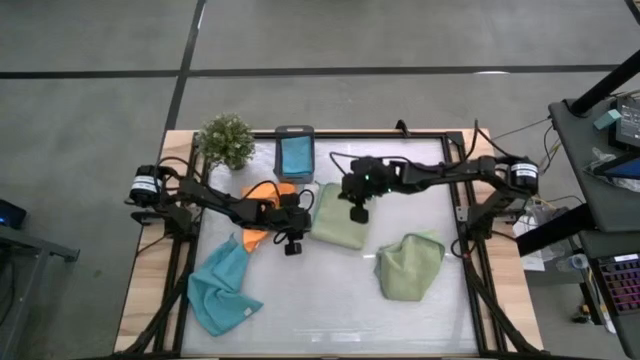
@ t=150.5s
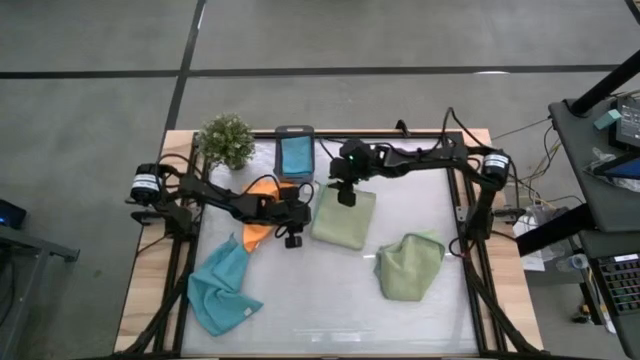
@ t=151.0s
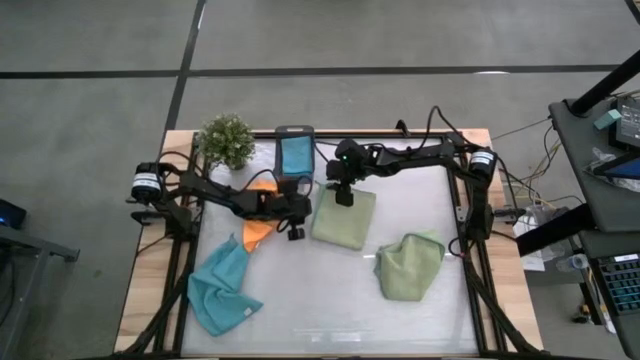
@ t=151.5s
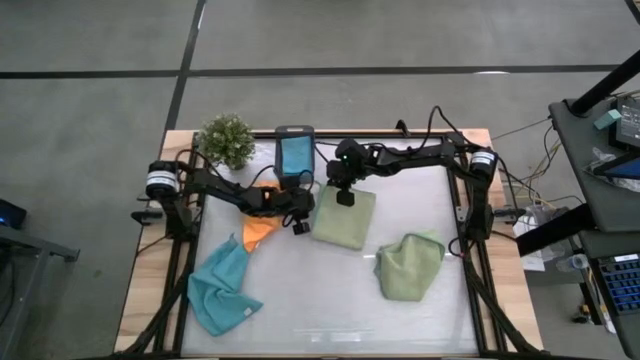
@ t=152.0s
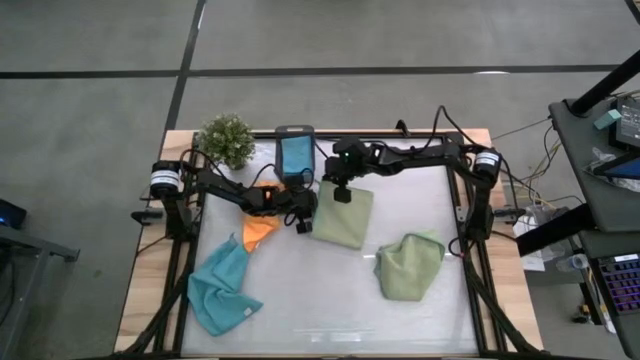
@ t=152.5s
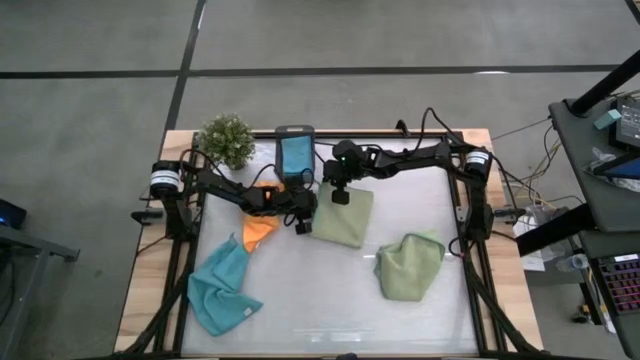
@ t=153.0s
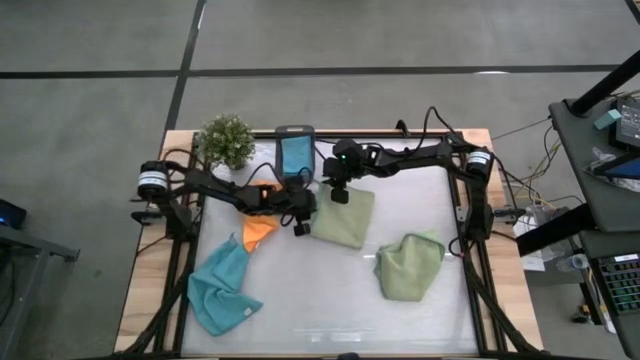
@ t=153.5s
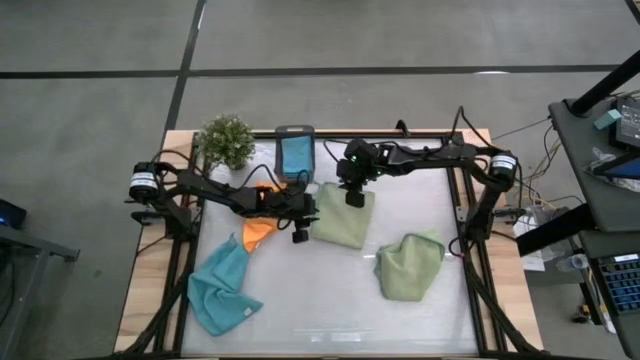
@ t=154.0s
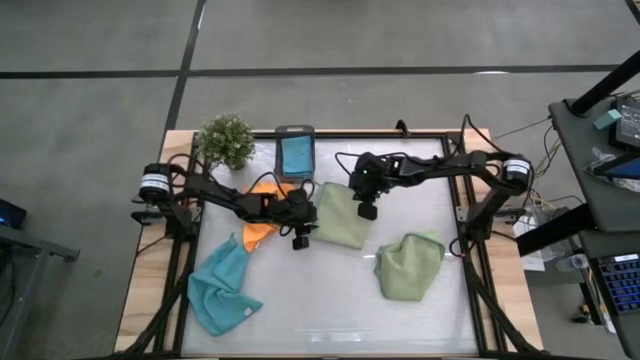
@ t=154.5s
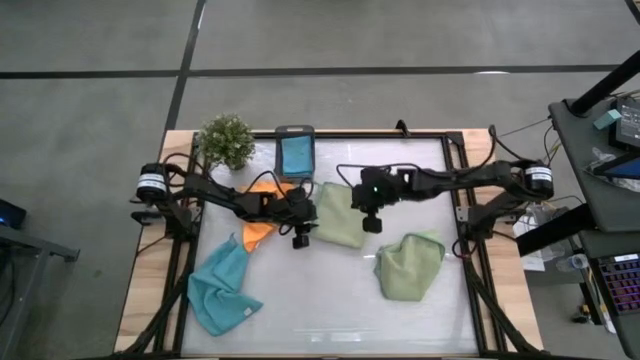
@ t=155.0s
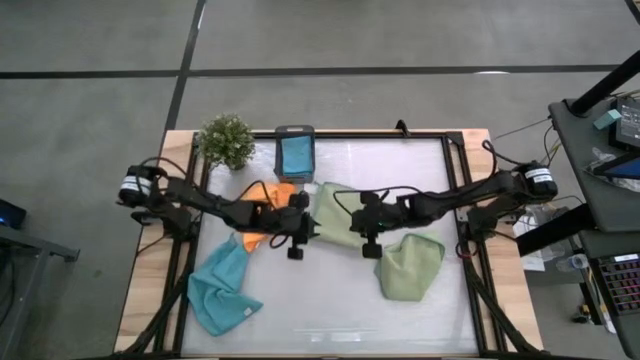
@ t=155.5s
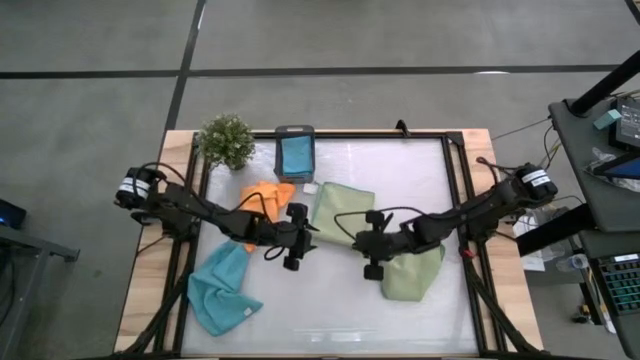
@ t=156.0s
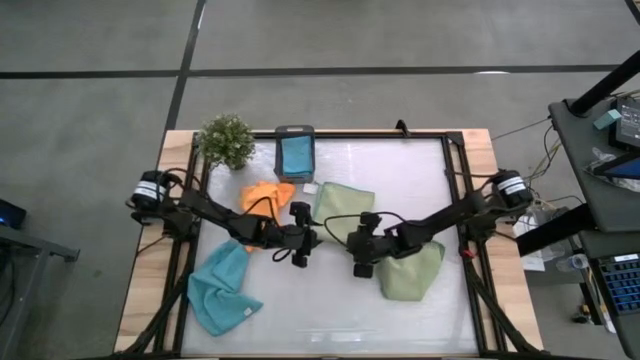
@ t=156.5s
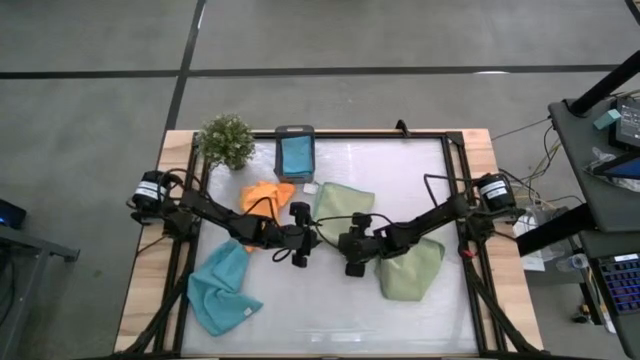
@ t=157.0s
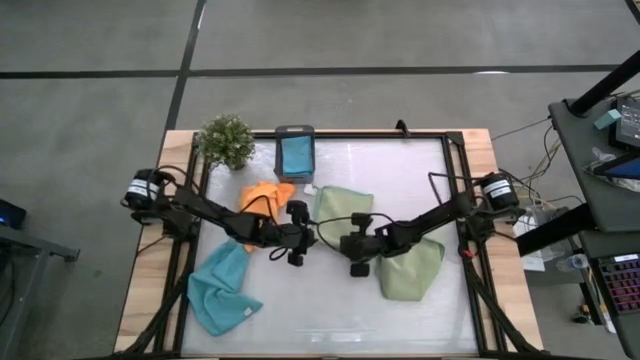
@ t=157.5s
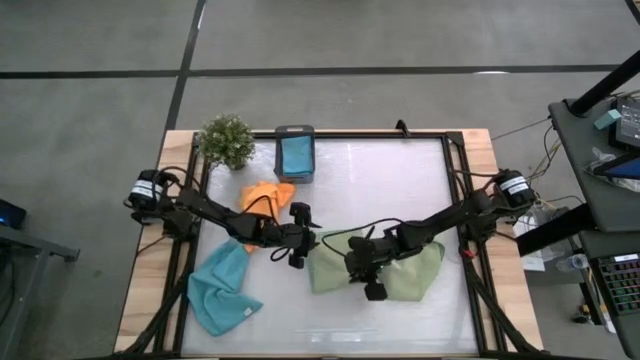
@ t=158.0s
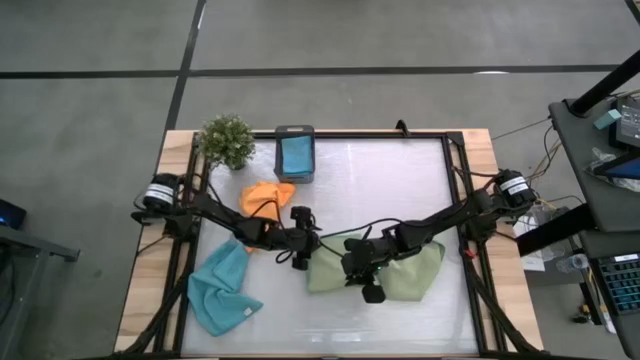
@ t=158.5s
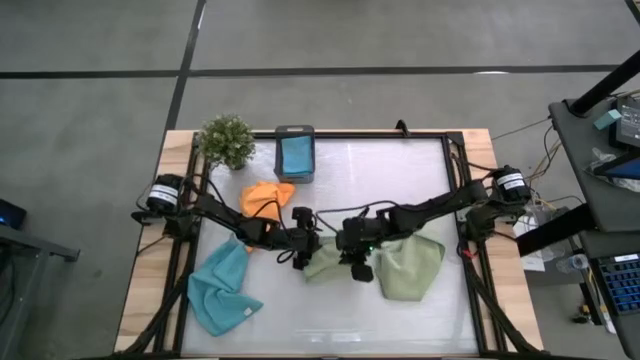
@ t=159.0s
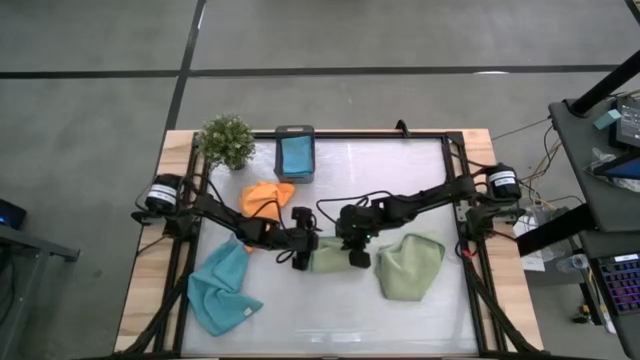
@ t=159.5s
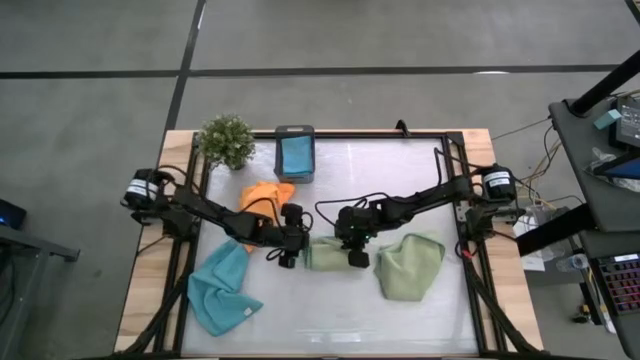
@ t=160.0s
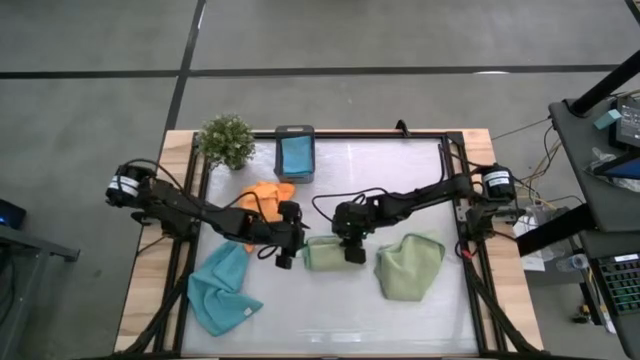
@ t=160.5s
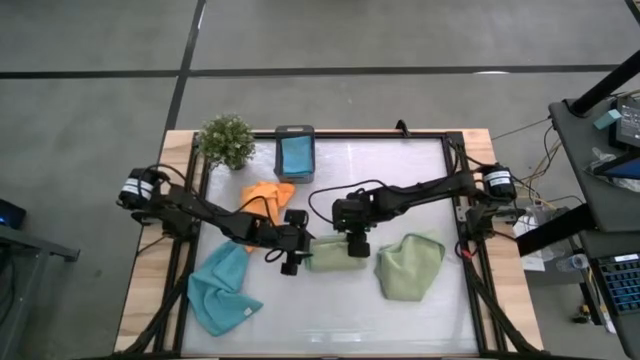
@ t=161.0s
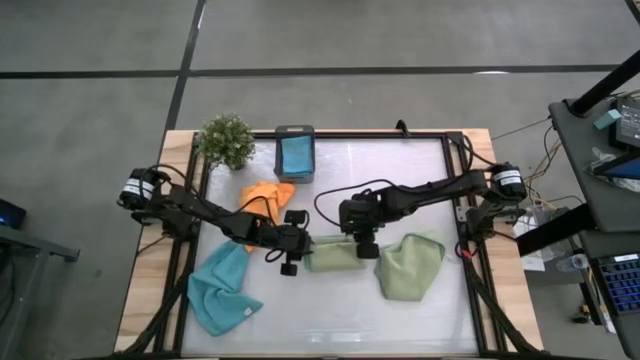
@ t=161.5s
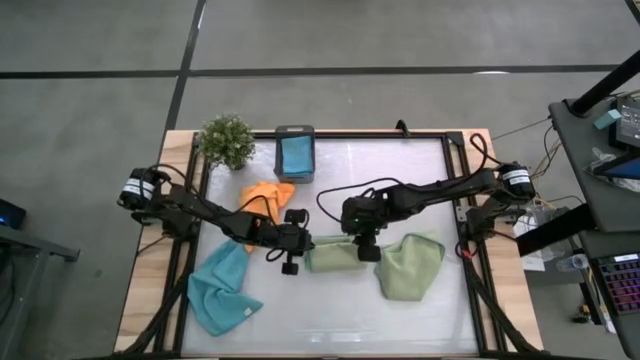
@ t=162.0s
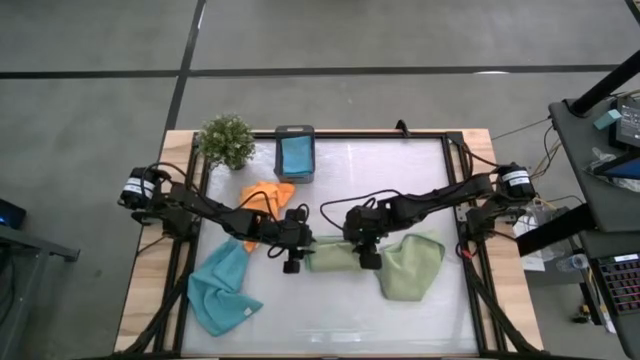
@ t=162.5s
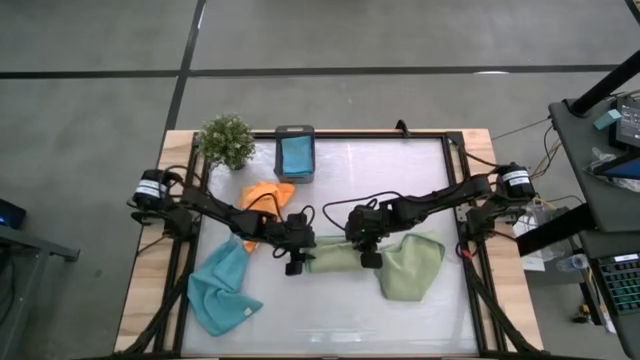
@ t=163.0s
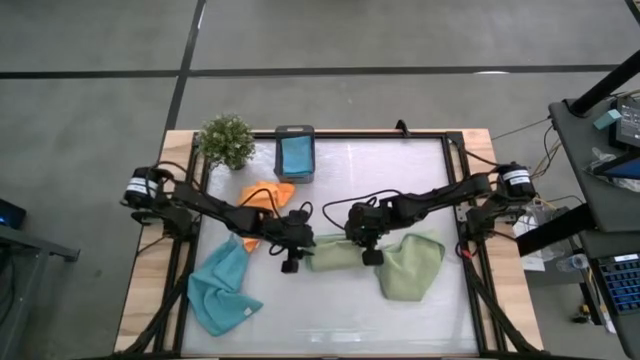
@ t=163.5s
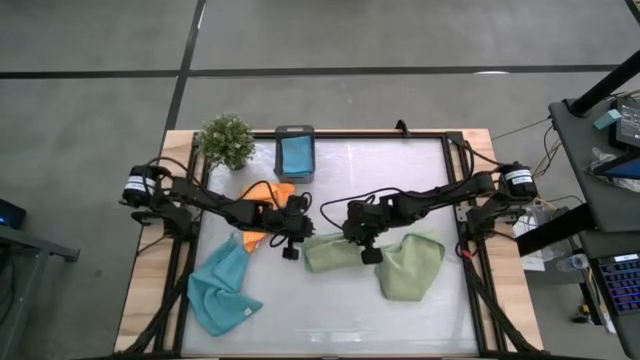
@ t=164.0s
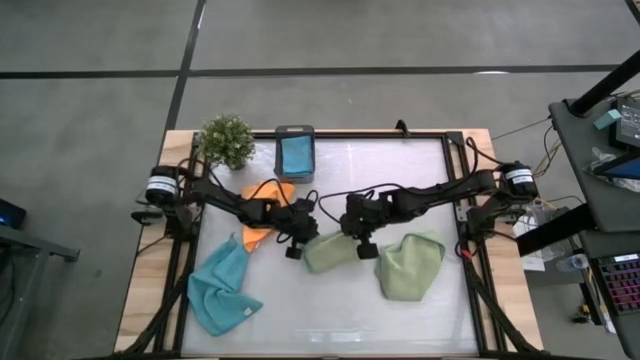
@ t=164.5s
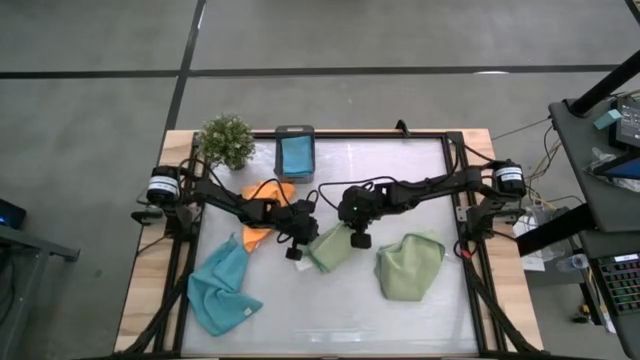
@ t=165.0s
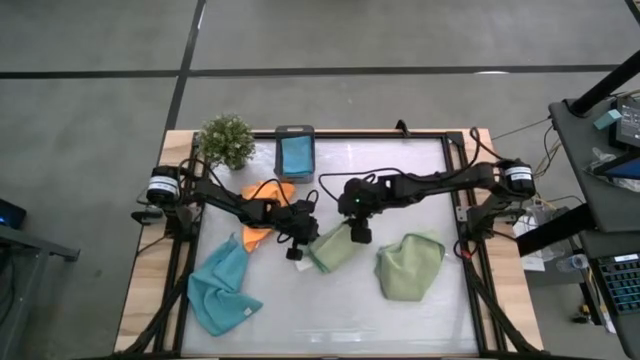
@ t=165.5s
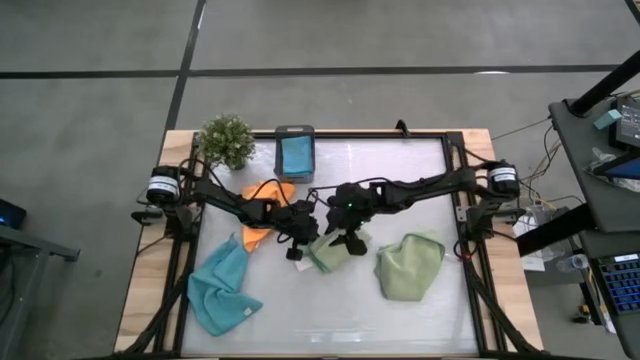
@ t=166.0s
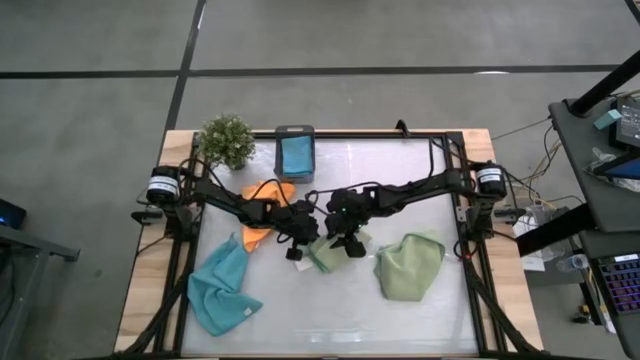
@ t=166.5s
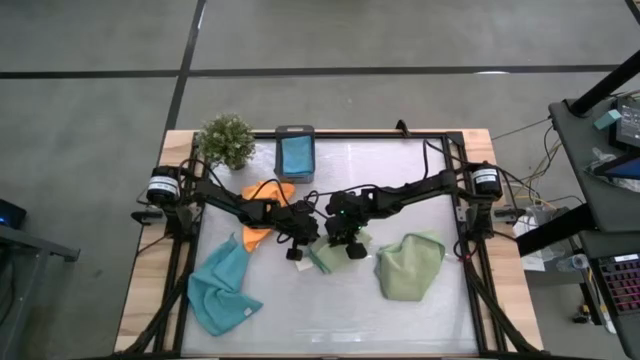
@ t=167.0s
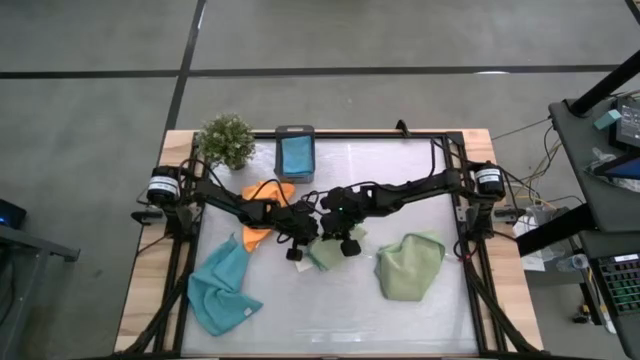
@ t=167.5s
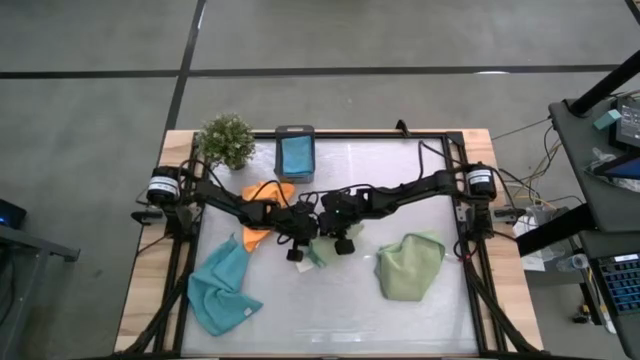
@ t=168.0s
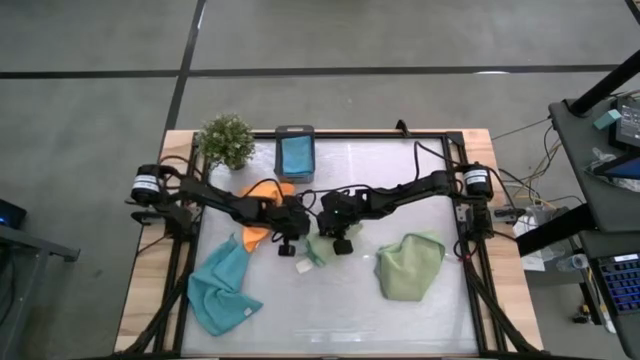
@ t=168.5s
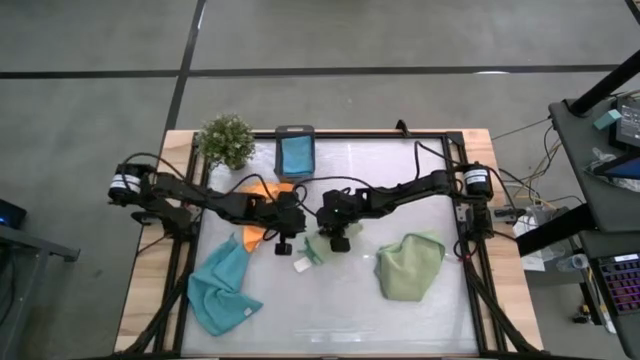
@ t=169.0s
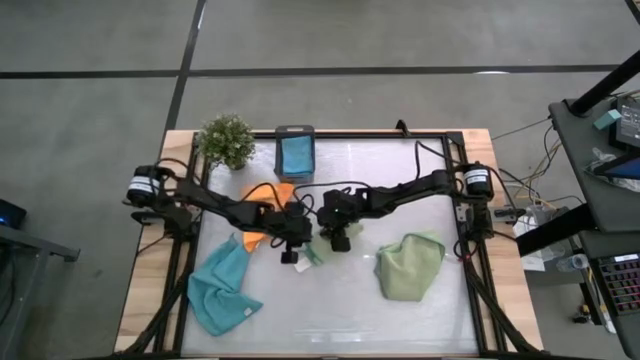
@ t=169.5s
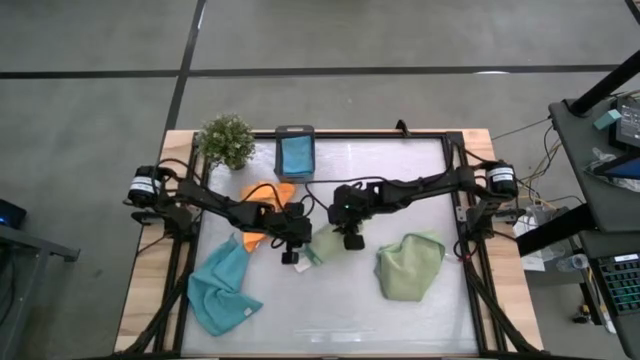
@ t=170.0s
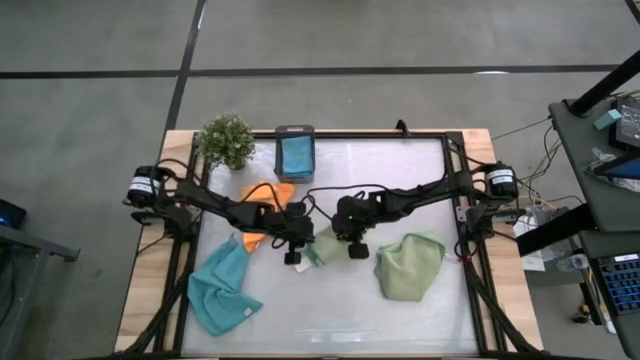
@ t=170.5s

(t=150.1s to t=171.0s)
Task: Fold microfiber towels
Fold the top green towel
